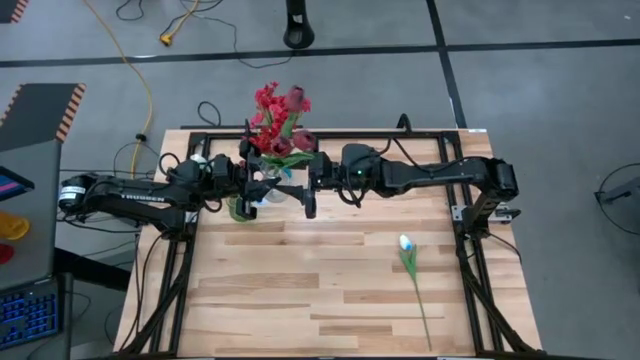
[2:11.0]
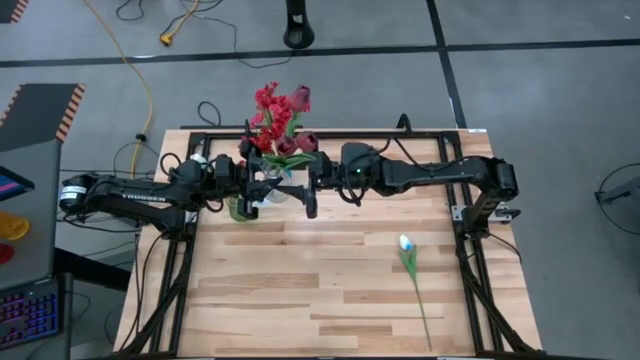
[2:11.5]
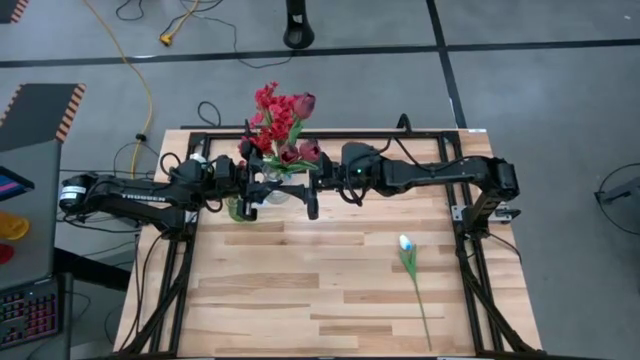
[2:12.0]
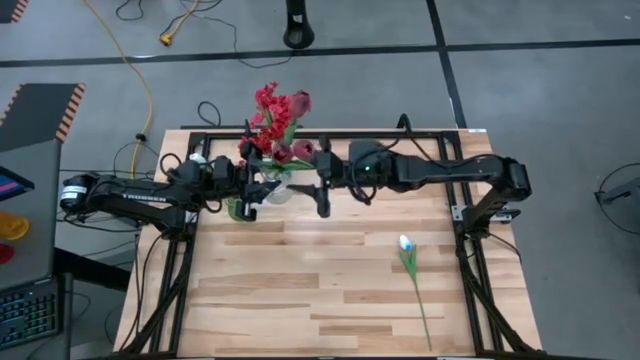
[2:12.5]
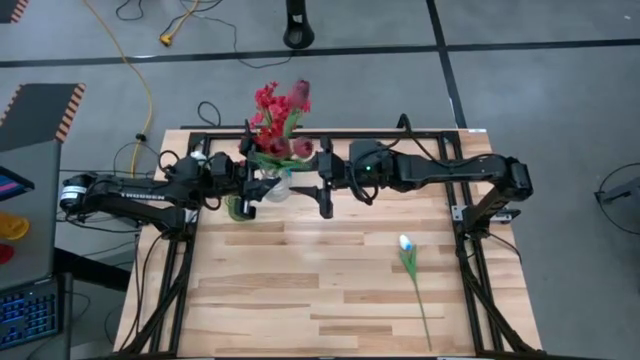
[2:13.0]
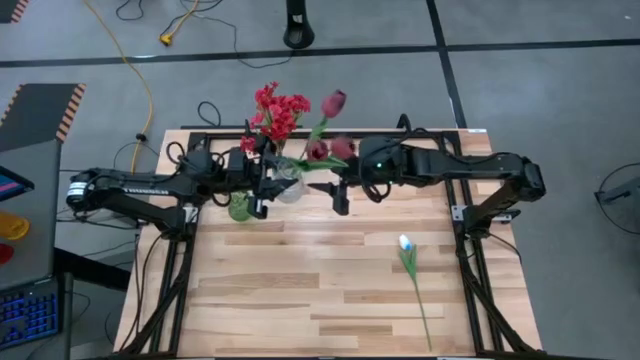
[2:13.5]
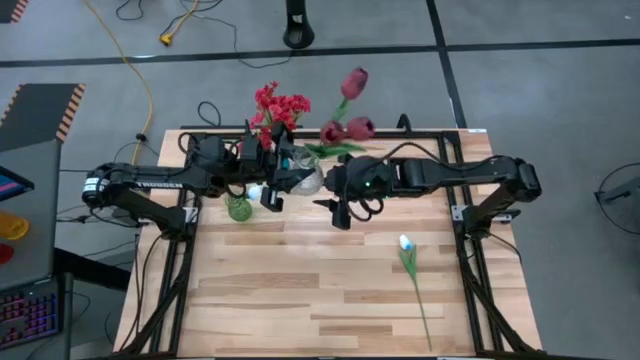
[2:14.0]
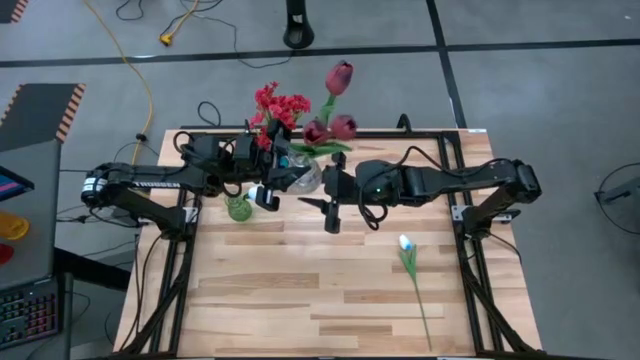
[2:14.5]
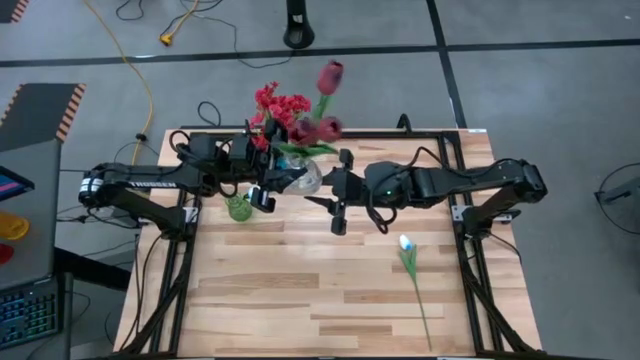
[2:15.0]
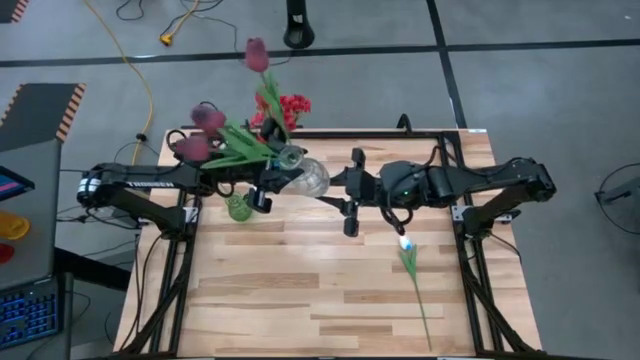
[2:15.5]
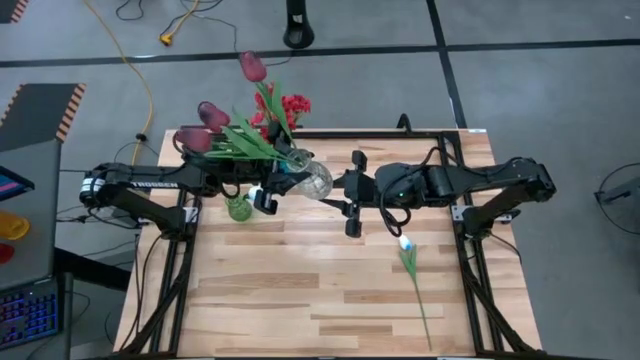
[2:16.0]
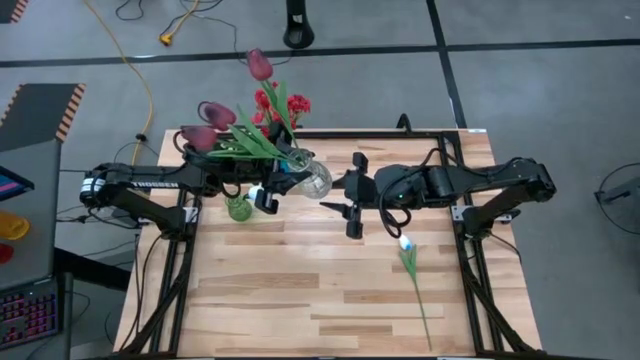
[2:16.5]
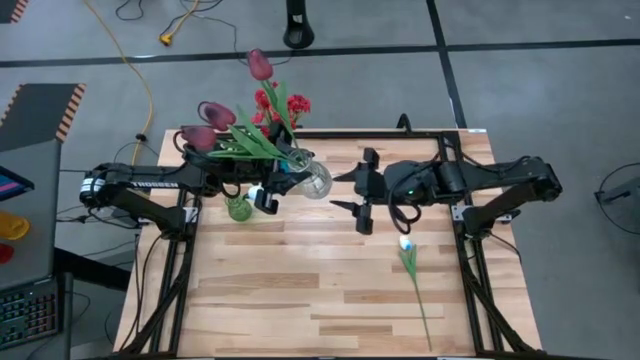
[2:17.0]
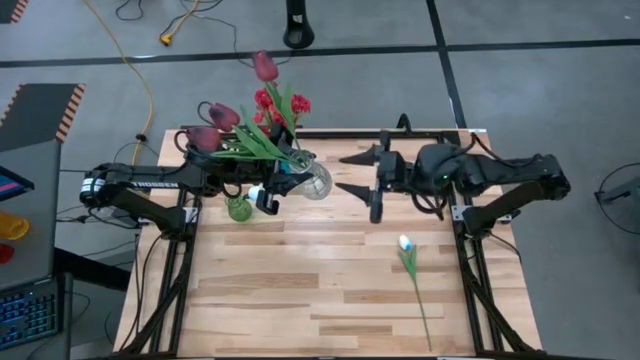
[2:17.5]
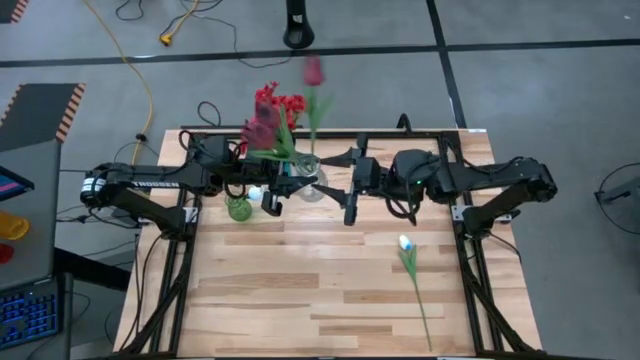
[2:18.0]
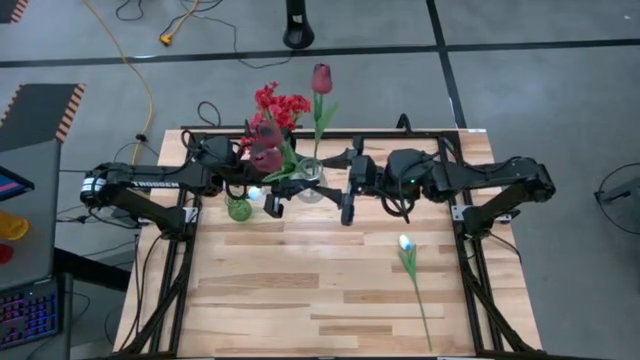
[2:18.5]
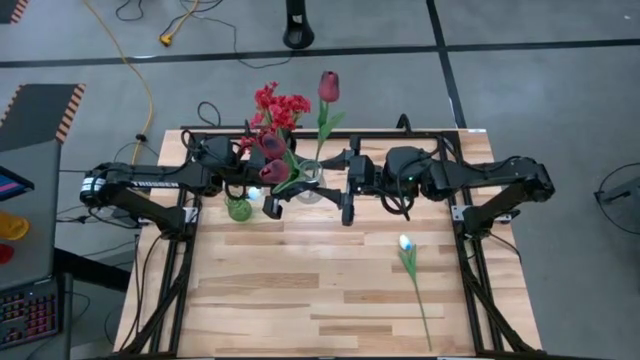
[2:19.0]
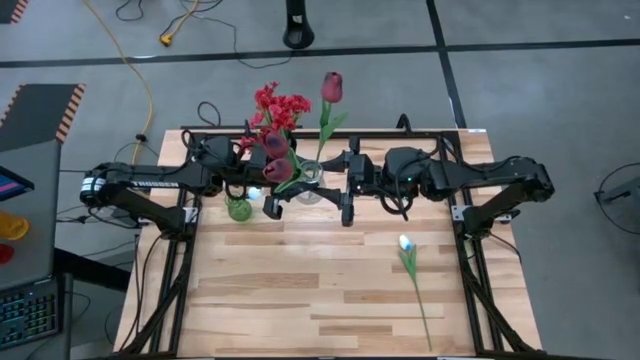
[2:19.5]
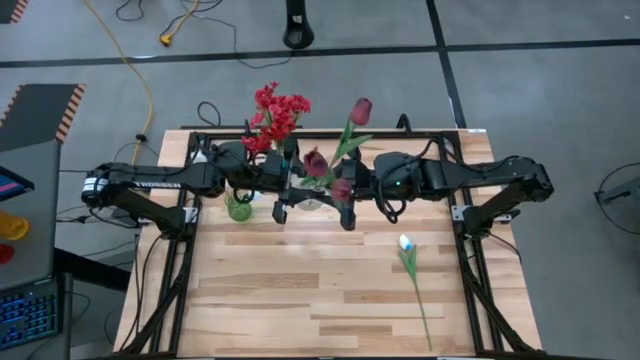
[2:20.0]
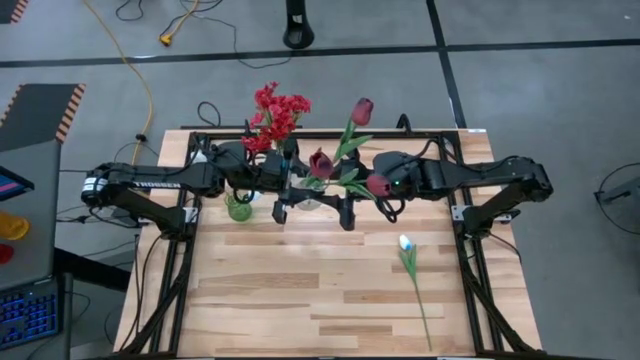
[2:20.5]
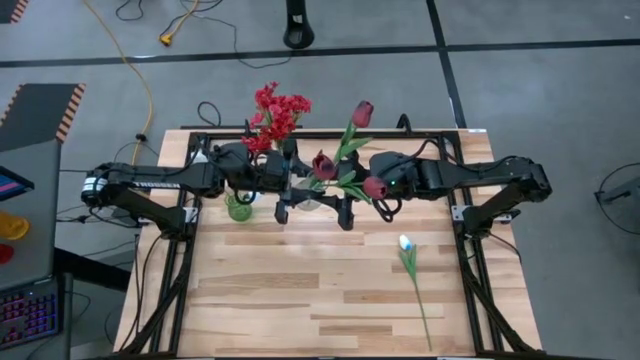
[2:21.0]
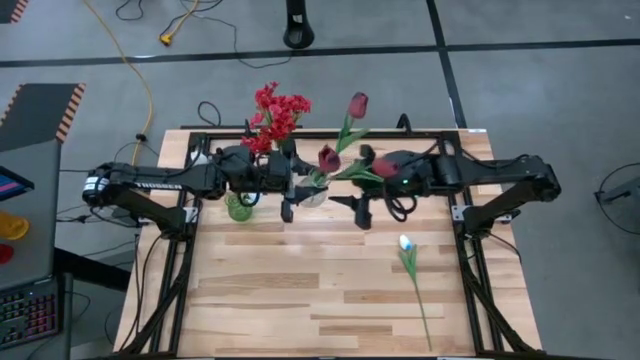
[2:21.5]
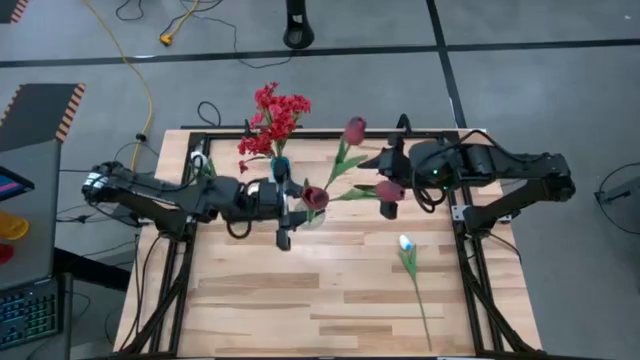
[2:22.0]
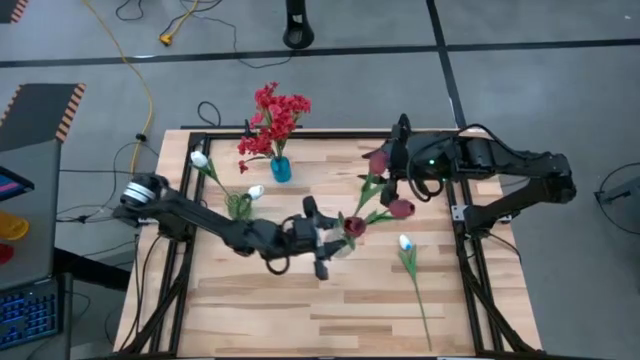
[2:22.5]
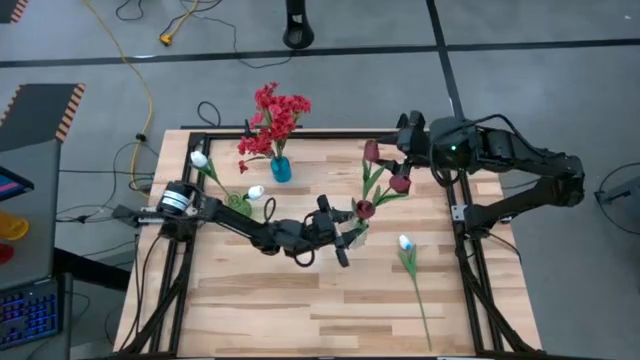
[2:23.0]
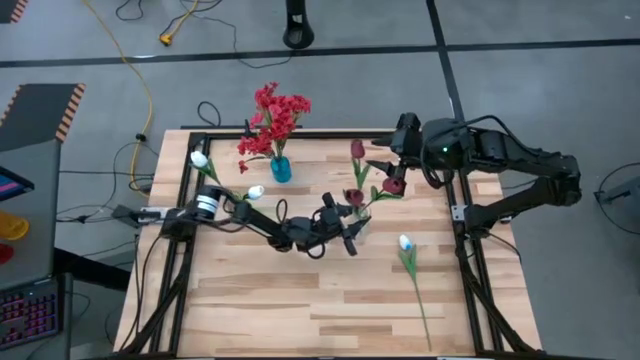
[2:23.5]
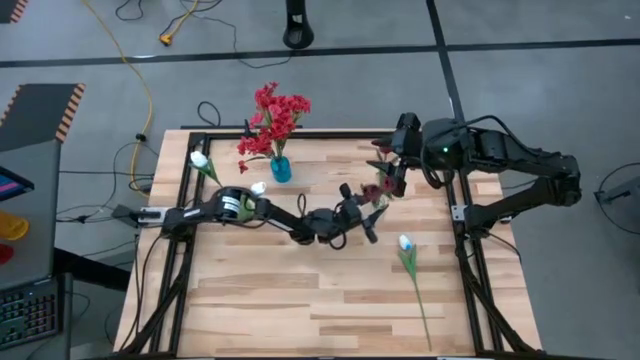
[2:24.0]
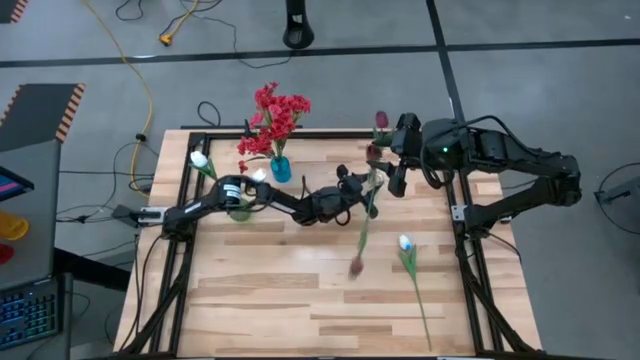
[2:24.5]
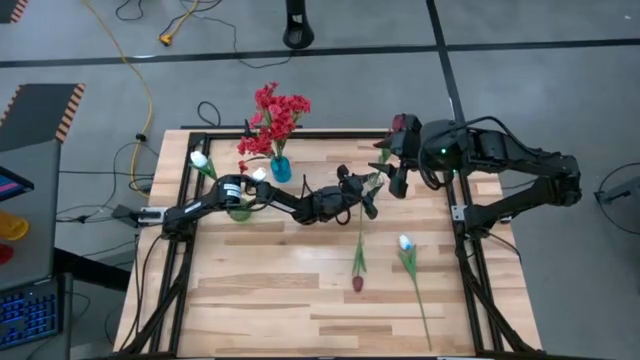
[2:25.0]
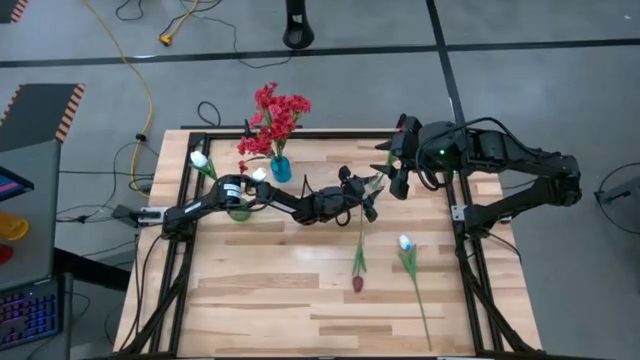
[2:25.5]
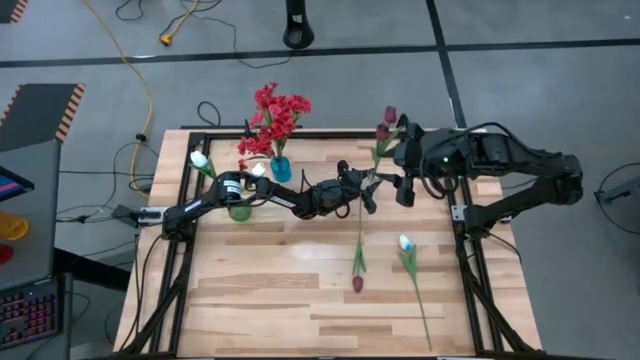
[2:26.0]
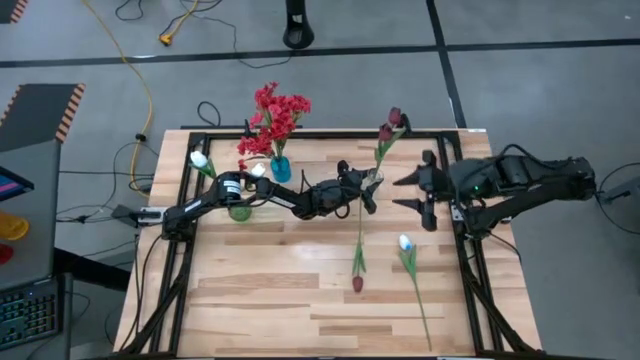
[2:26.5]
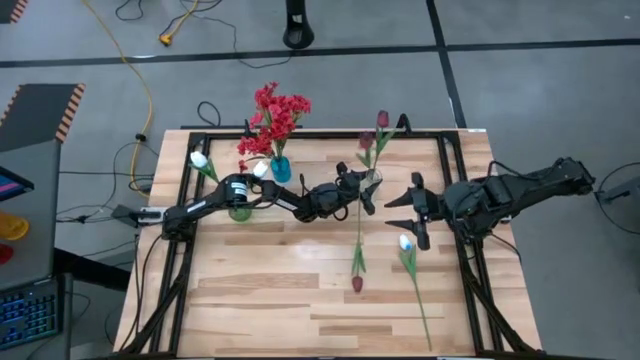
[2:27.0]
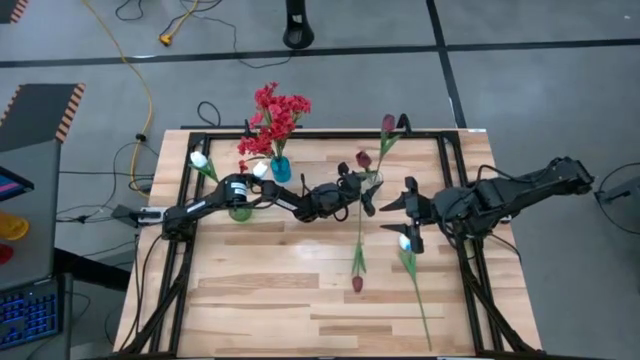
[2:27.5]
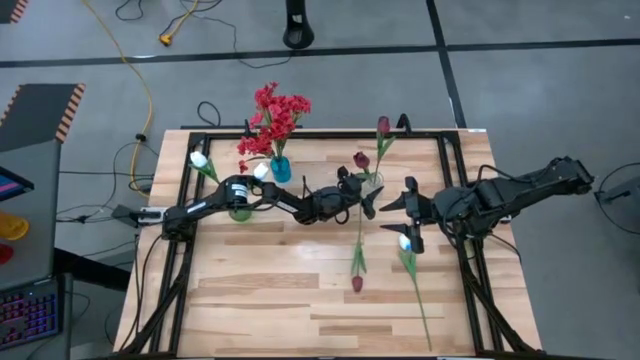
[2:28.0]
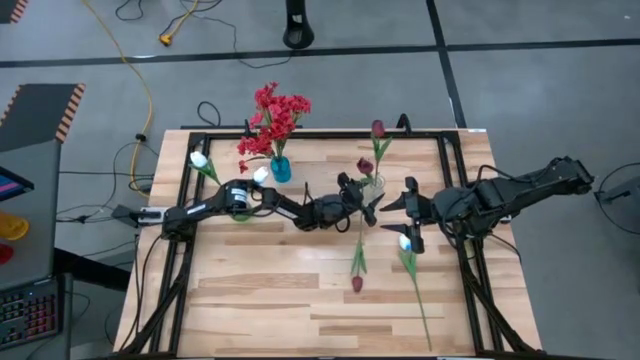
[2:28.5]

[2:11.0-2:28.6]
Task: Sort flowers into vase by color
Adjust the transparent vase by standing it upright on the table

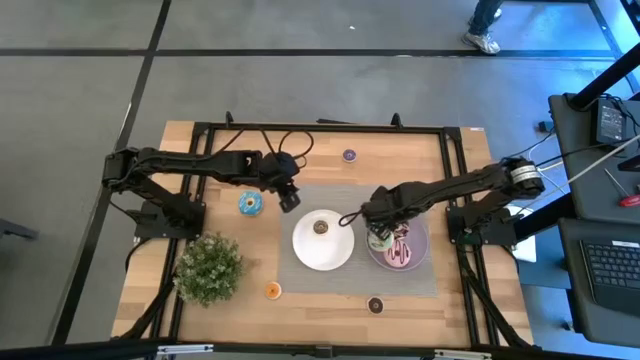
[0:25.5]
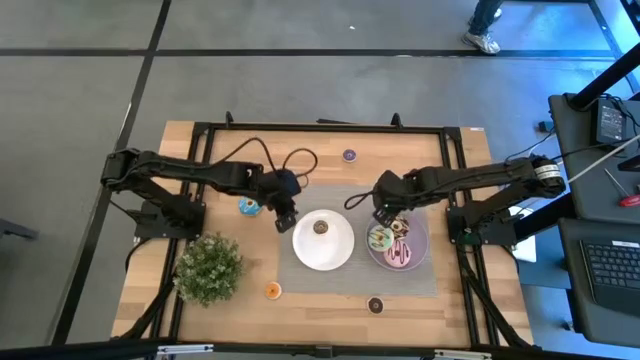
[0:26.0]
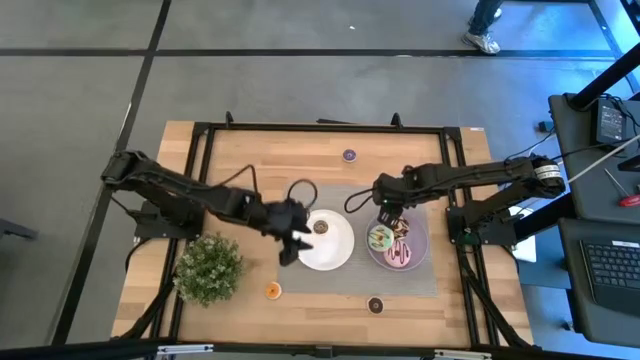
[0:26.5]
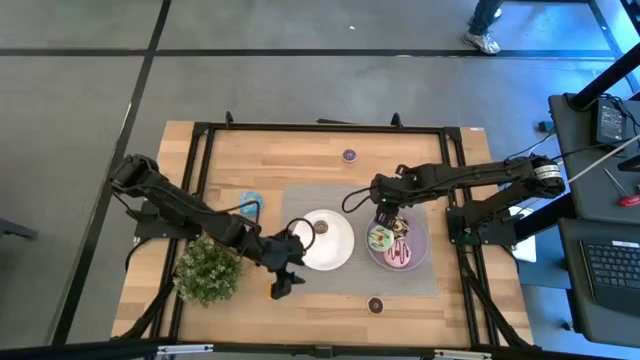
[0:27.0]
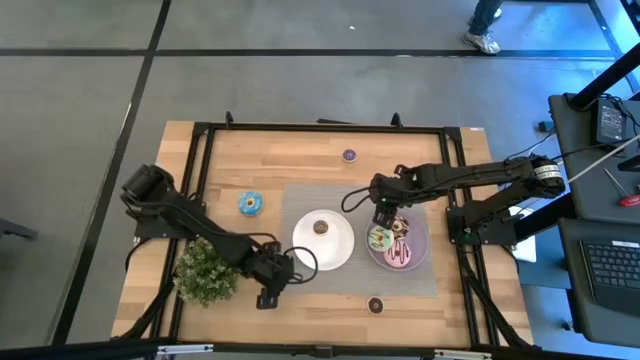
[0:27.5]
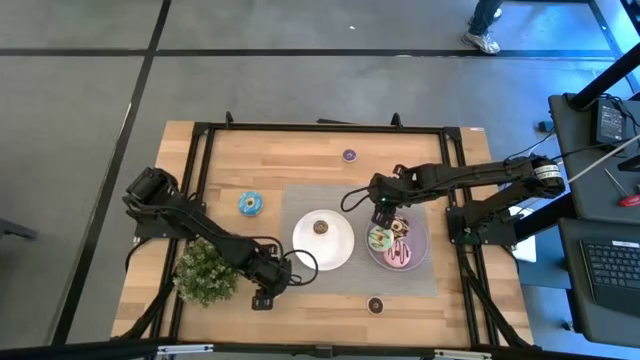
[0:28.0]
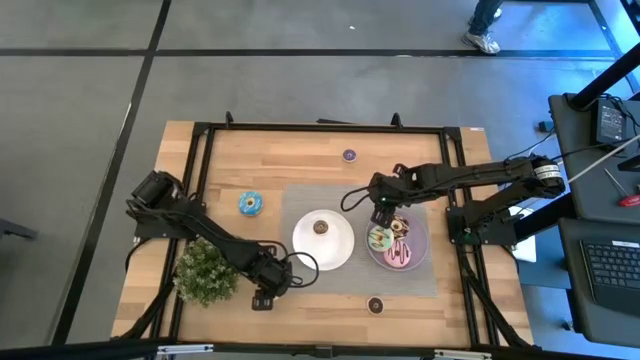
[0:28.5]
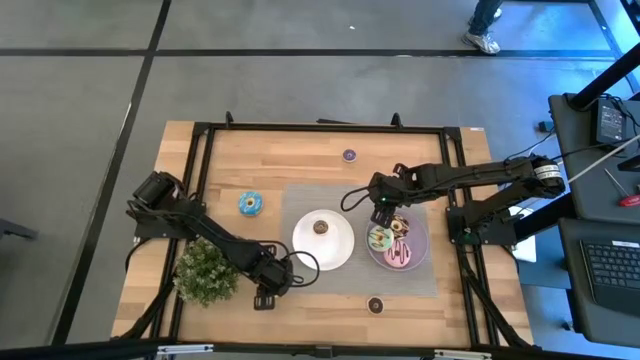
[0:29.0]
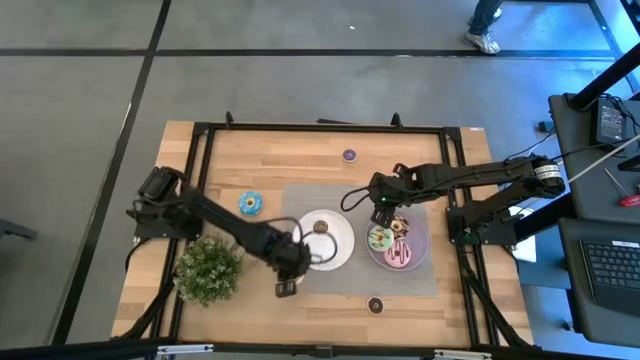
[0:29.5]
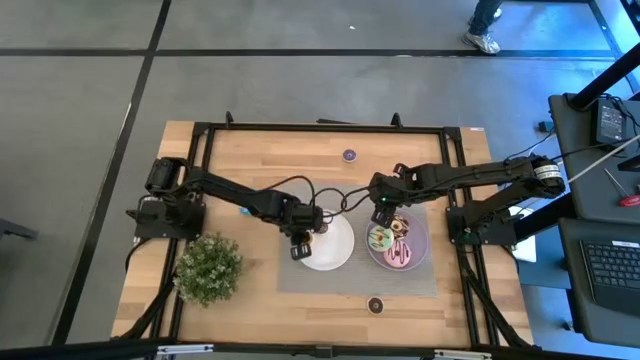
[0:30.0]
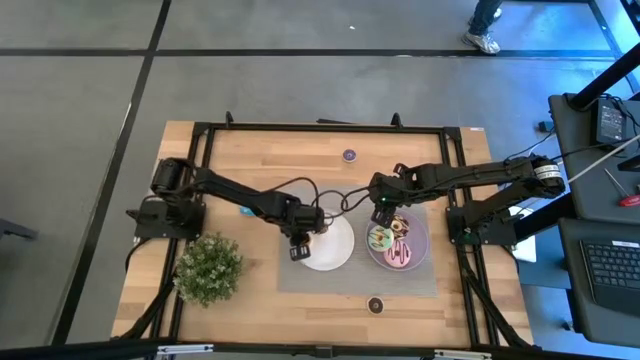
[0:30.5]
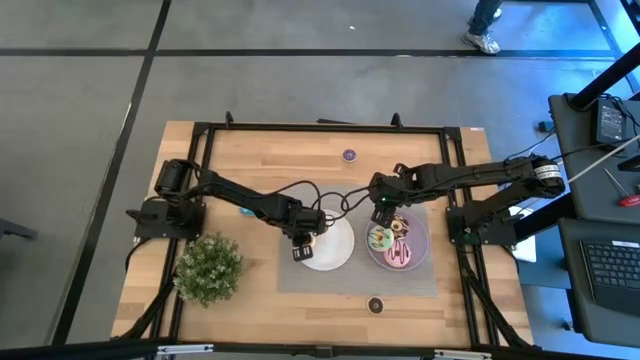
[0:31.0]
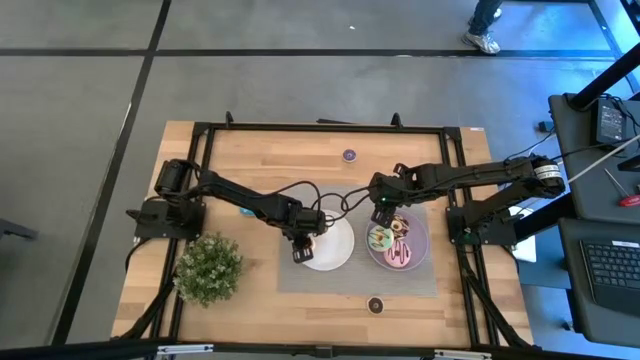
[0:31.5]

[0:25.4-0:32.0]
Task: Pick & Place donuts
Put the small orange donut on the white plate
